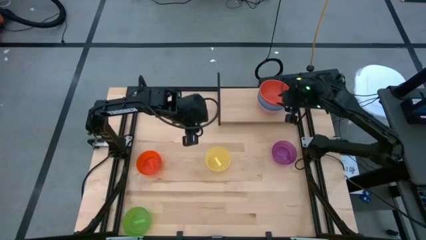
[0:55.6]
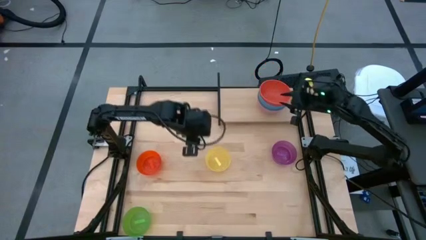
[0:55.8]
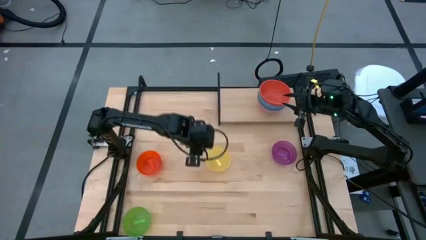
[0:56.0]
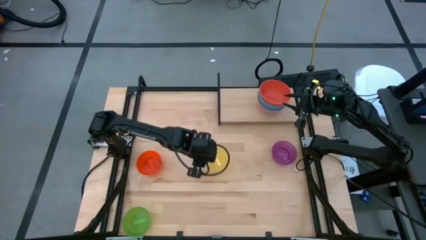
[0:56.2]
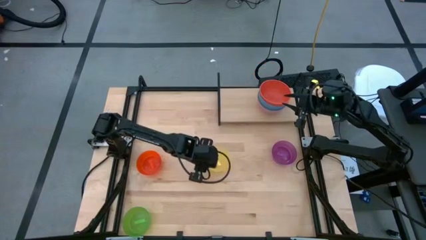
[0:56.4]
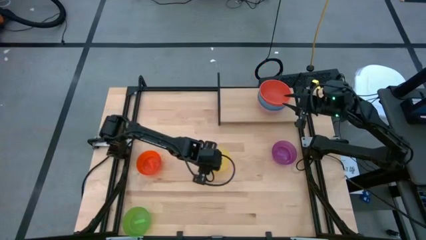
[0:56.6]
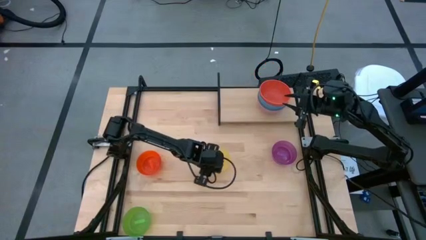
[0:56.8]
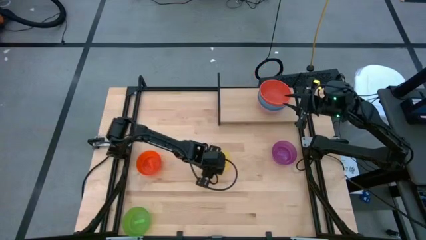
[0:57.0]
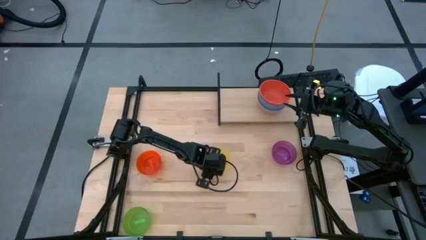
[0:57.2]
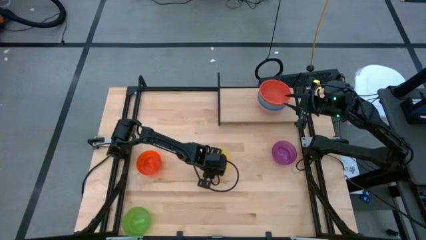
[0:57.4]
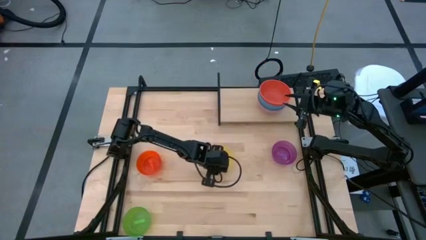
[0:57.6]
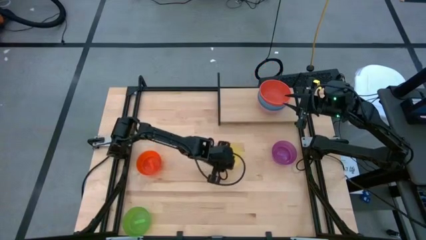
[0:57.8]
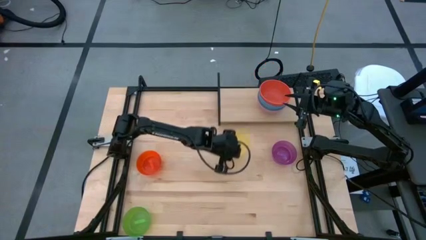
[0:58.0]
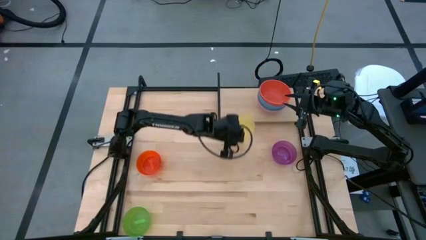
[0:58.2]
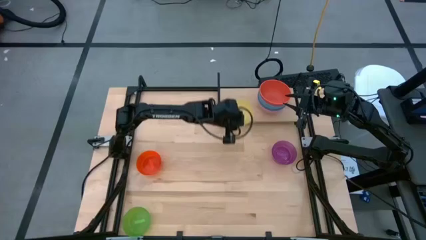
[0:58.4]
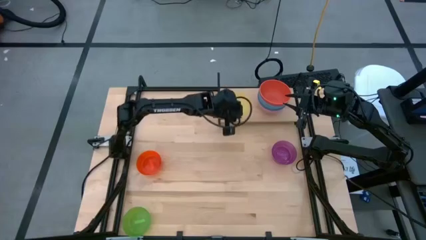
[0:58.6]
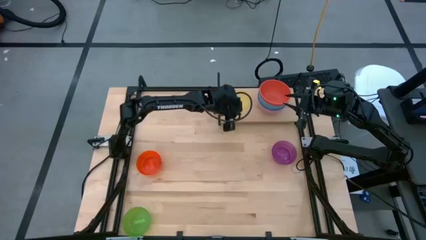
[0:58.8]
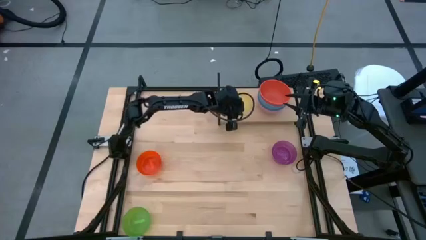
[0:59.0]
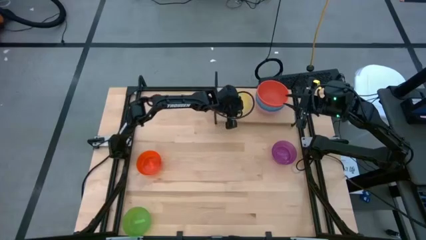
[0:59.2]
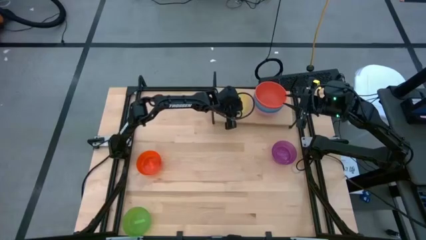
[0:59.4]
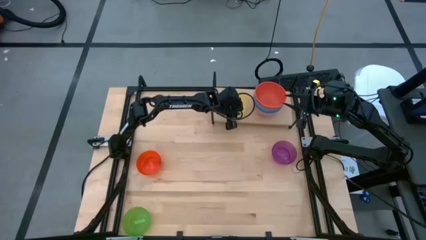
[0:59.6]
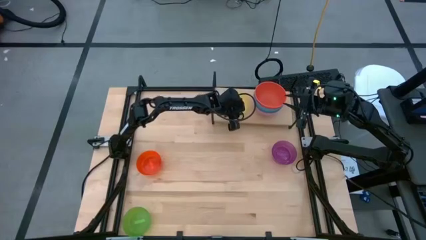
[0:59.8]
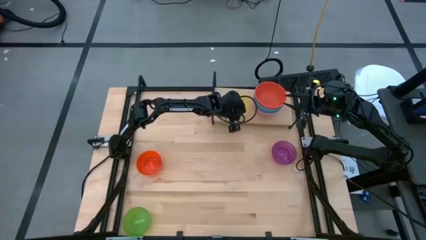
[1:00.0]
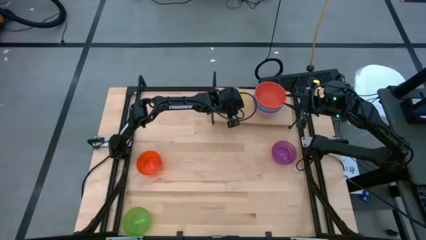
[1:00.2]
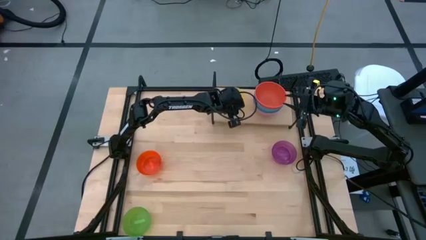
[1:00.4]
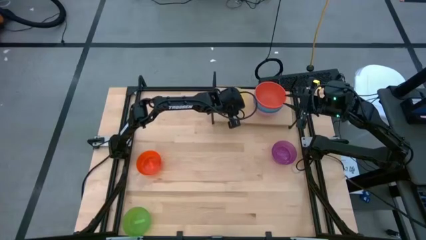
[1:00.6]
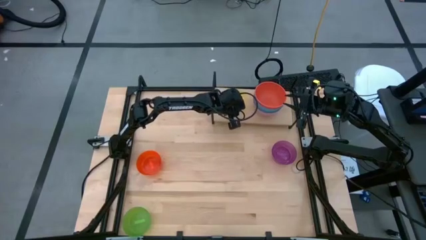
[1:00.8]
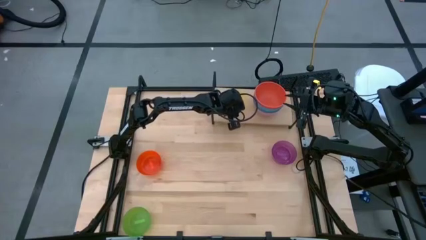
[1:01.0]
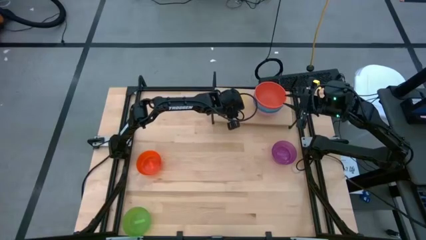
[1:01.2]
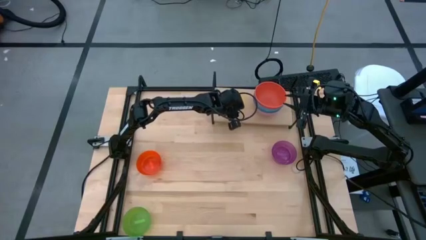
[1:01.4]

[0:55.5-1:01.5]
Task: Place and stack bowls onto a shelf
Put the transparent yellow bowl on the shelf

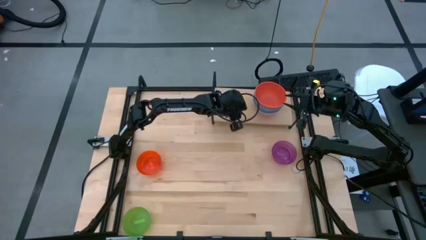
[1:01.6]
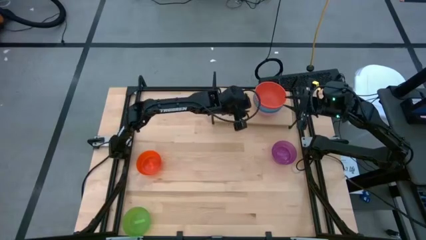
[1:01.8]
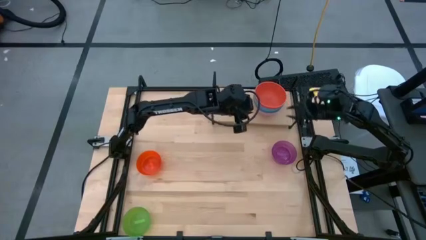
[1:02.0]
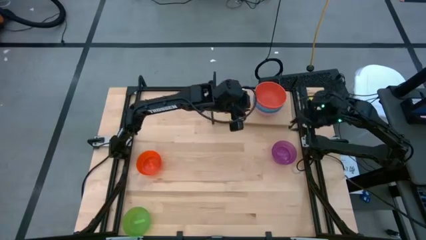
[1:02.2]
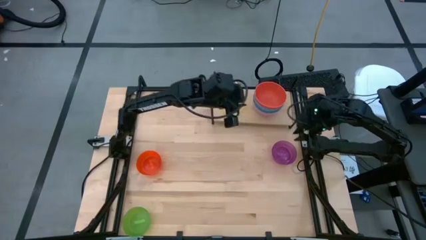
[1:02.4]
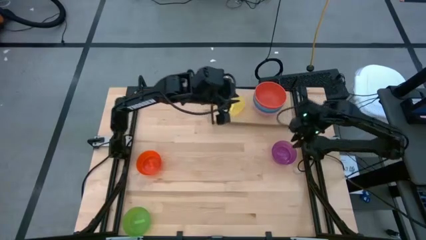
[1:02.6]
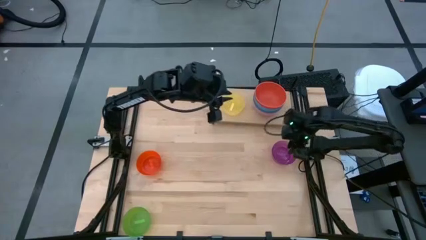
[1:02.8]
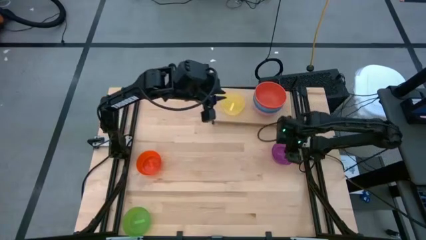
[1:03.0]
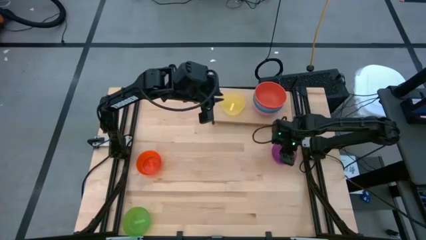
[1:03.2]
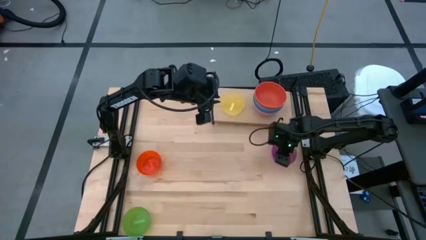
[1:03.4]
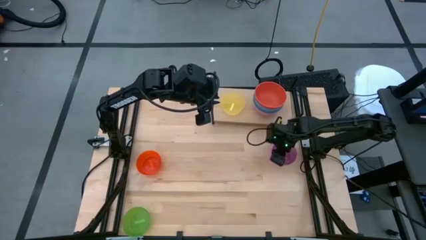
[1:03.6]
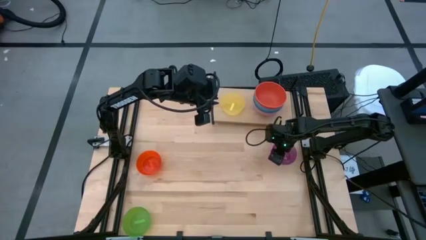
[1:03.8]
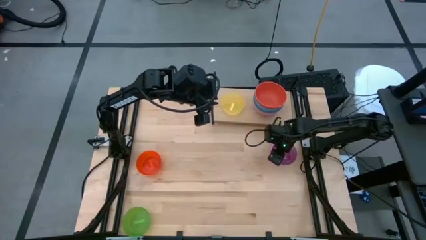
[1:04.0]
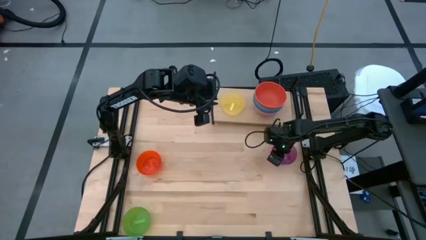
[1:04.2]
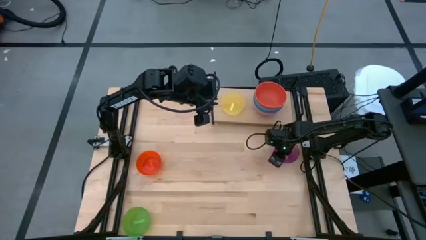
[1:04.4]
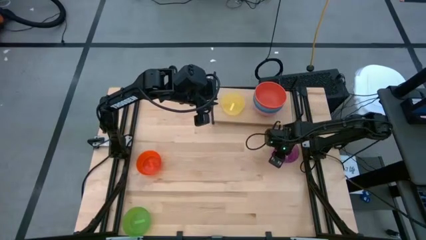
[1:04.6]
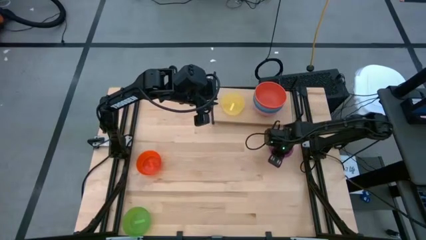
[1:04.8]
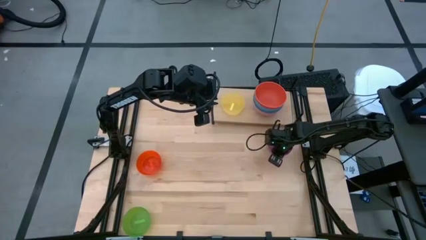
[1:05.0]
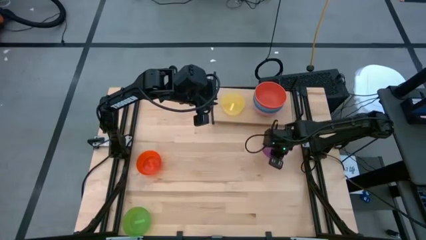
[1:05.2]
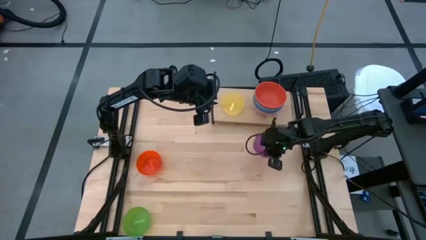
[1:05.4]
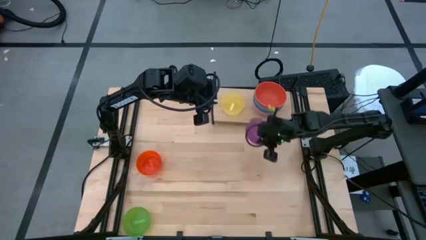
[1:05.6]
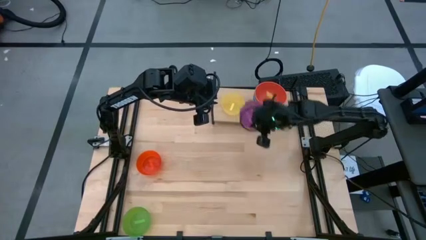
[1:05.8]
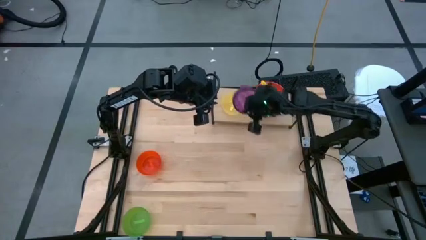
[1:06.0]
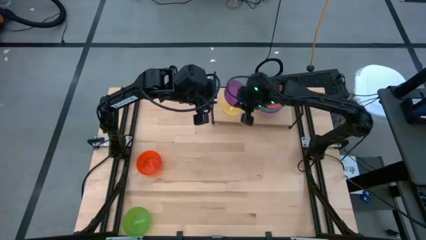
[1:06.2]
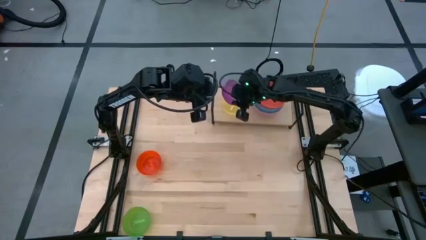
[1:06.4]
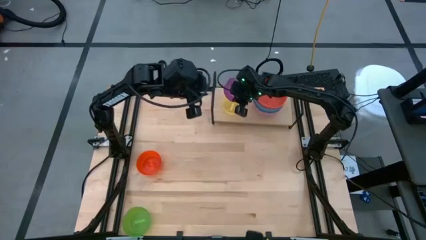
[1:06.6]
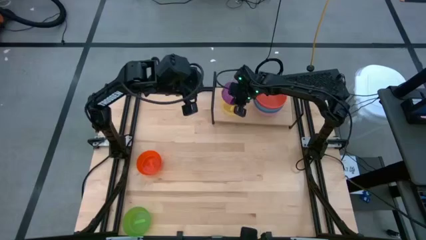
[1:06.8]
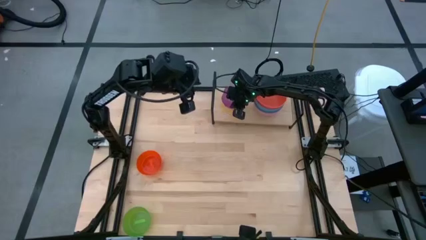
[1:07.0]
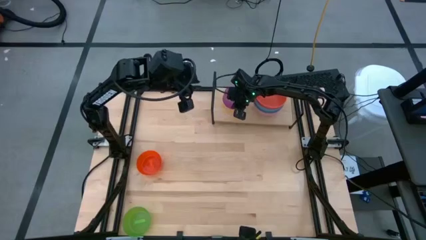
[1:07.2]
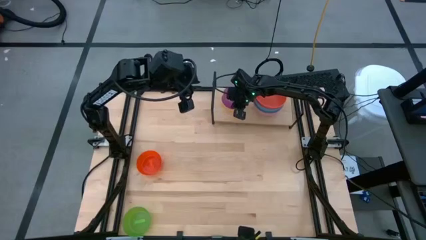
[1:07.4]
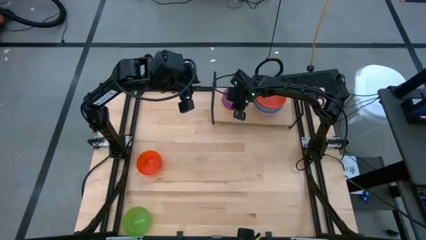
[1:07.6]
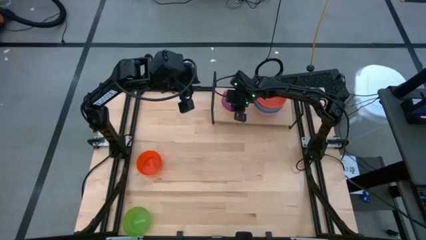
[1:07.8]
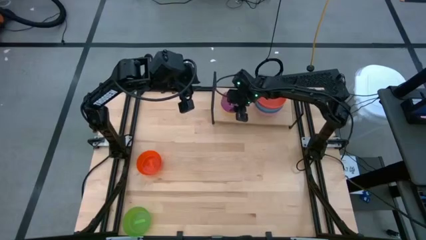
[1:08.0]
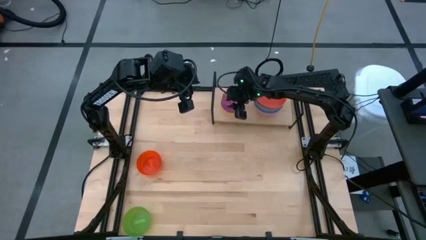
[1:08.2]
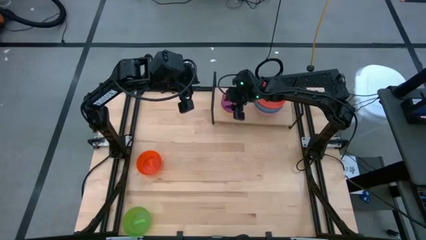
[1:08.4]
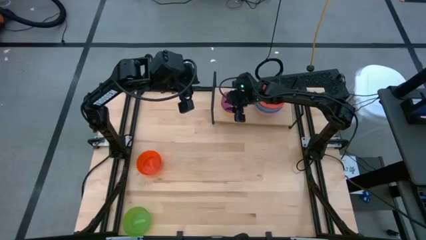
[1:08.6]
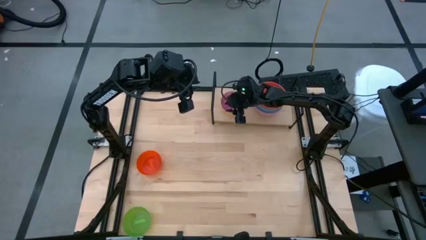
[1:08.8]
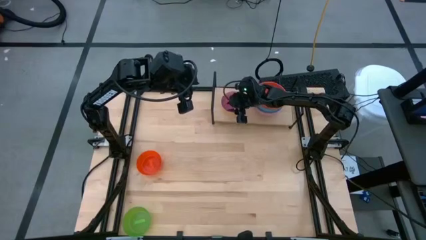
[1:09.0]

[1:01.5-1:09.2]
Stack the transparent purple bowl on top of the transparent yellow bowl
